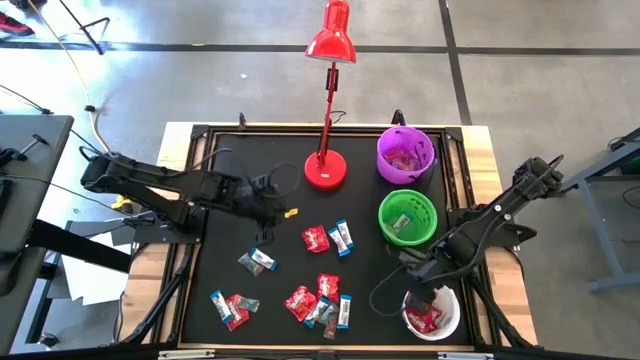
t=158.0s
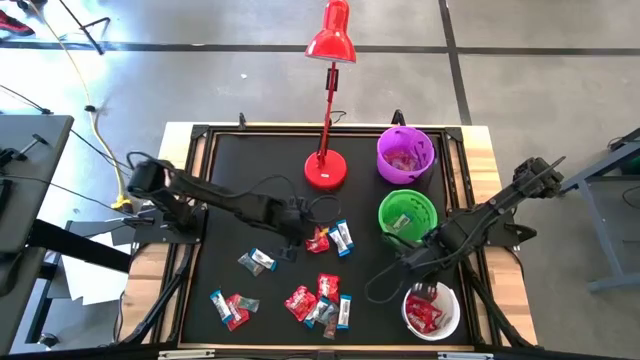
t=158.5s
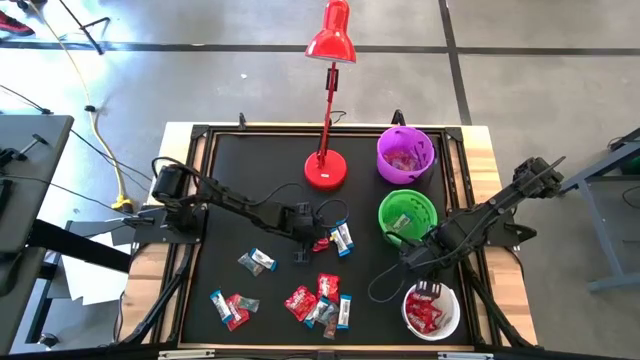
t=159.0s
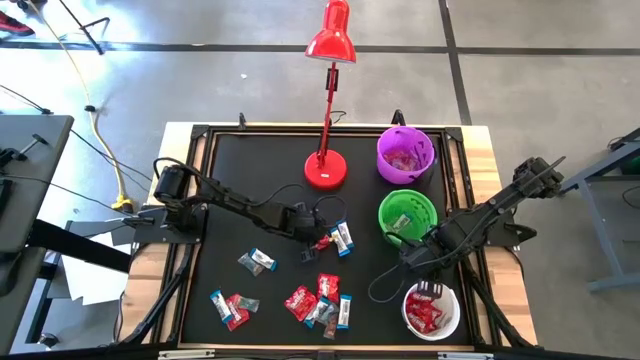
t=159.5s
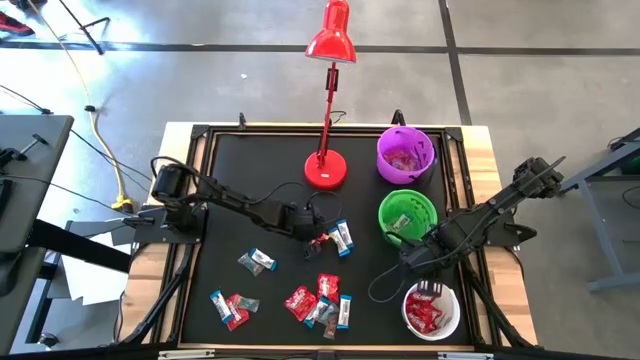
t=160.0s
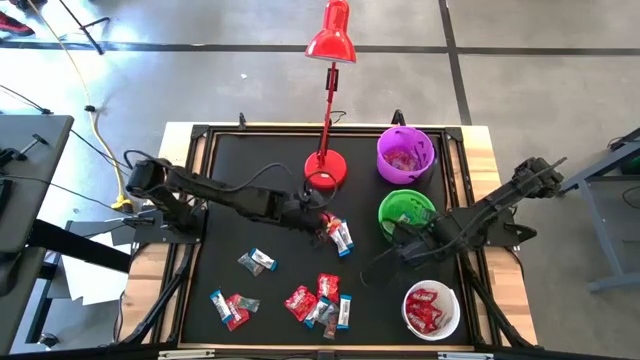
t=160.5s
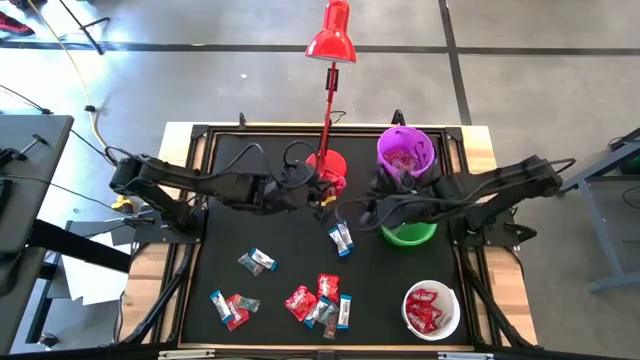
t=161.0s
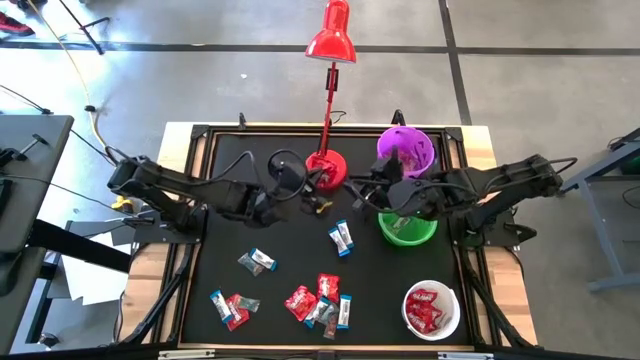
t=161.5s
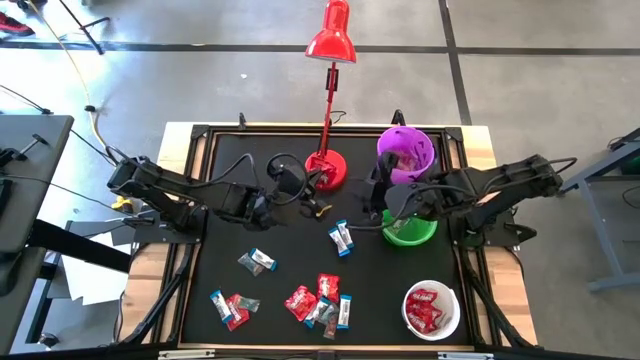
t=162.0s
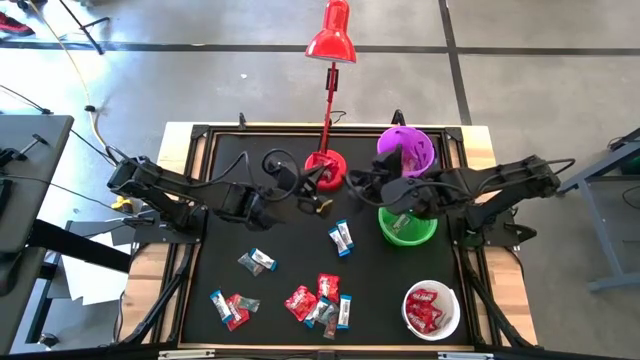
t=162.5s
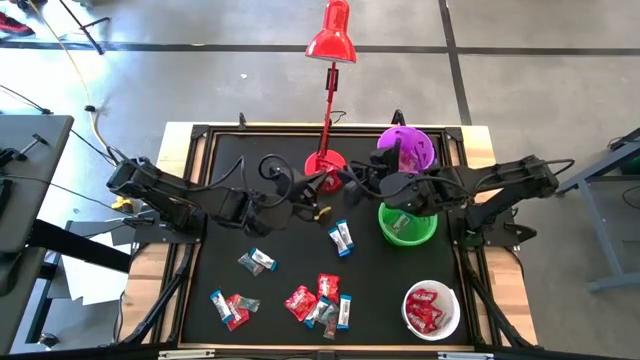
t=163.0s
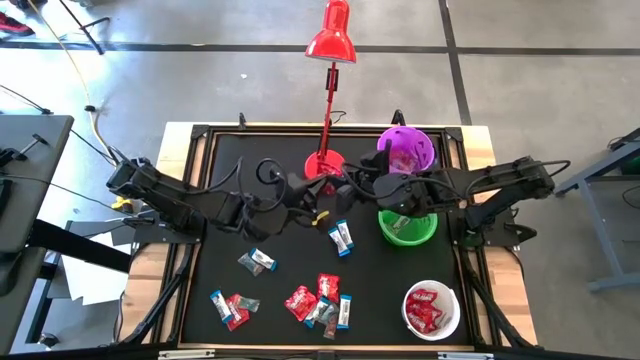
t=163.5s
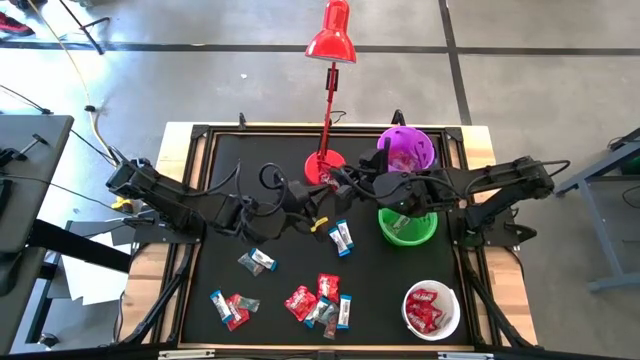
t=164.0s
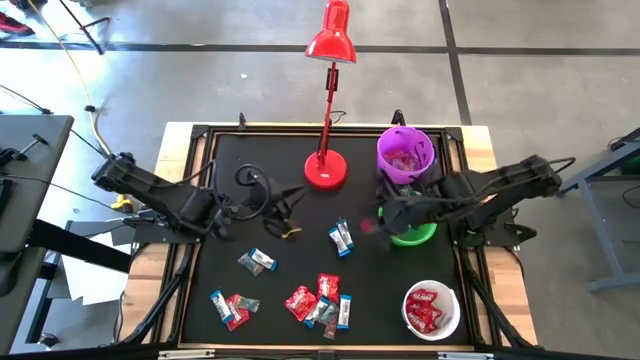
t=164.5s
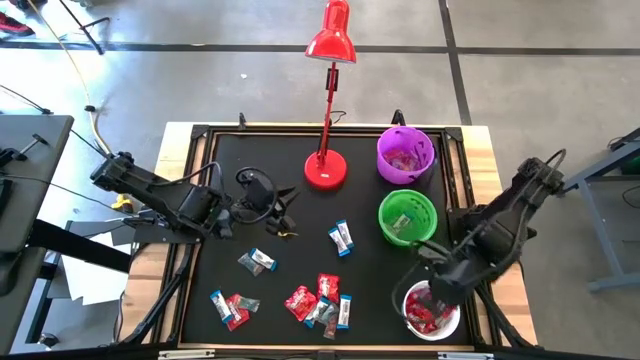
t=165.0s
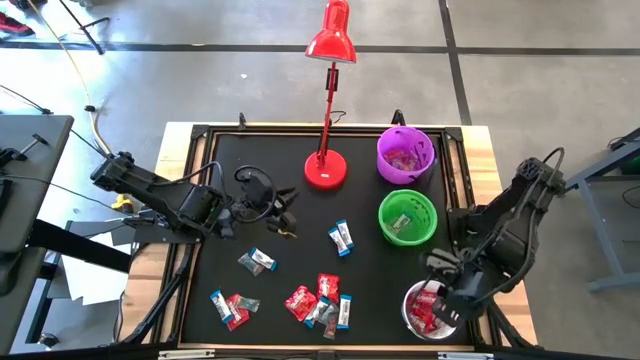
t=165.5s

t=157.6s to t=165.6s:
Task: Organize candy in baskets
Put the red candy into the white bucket

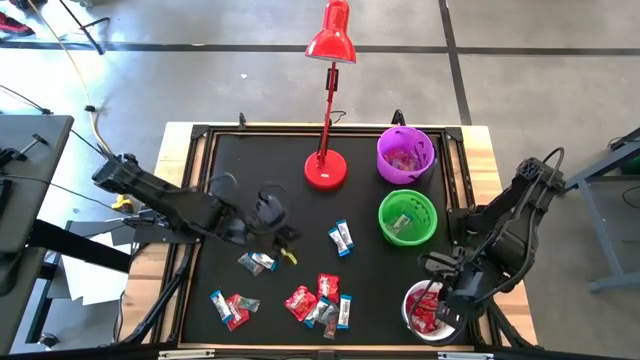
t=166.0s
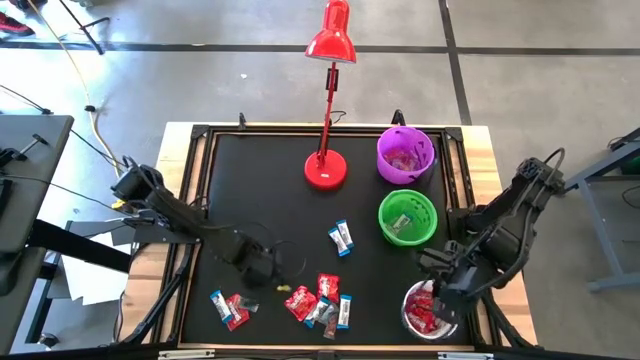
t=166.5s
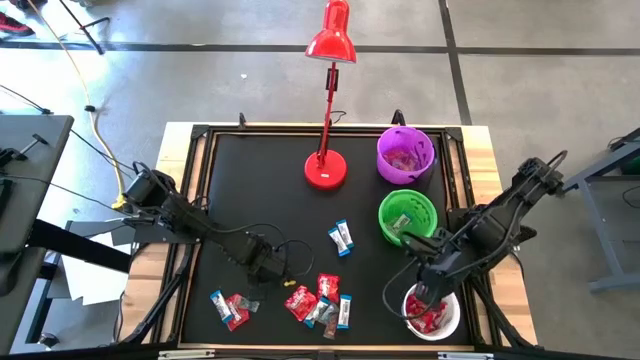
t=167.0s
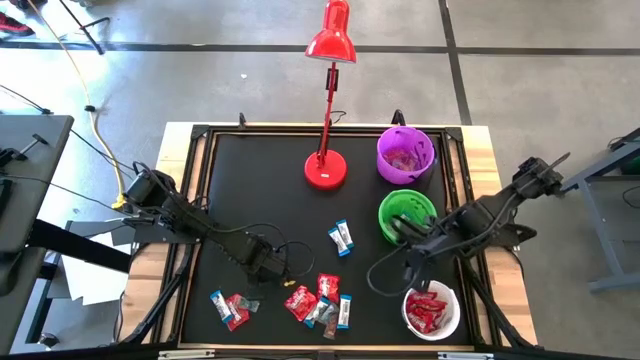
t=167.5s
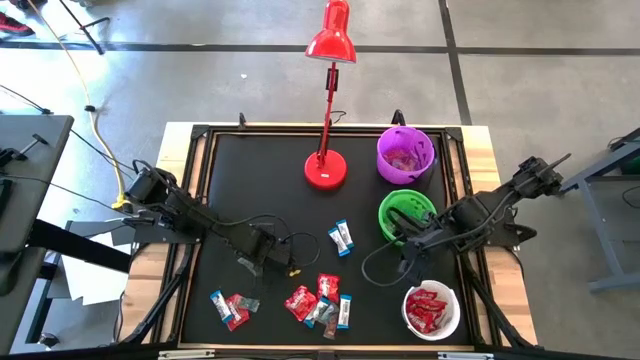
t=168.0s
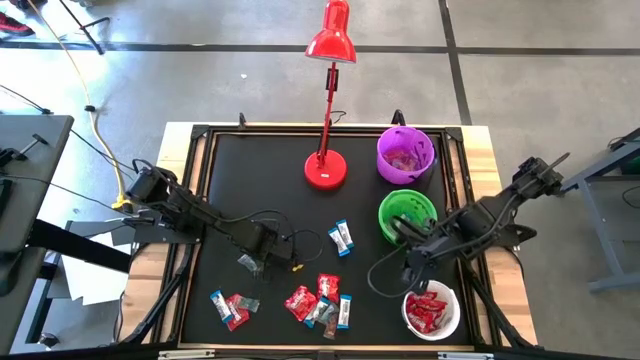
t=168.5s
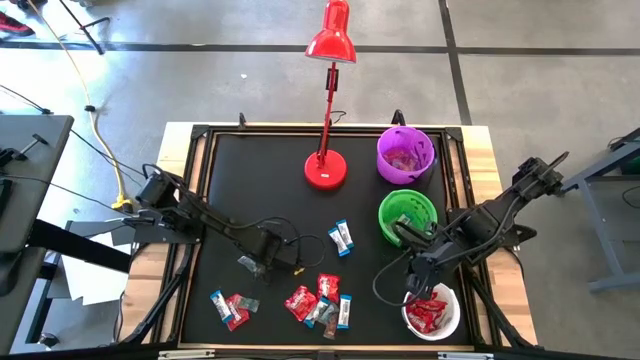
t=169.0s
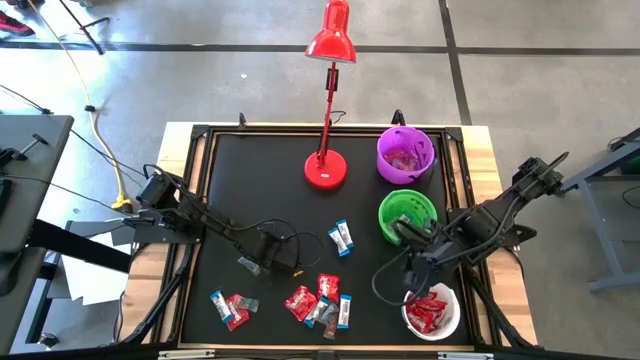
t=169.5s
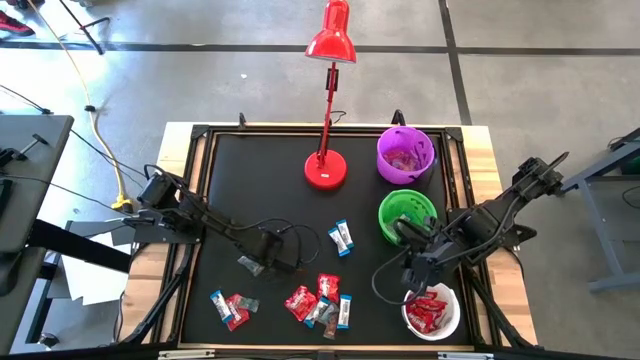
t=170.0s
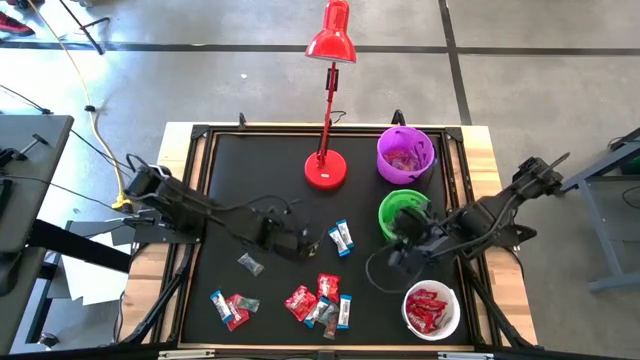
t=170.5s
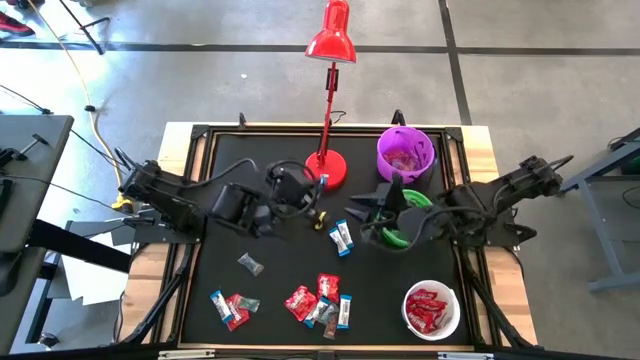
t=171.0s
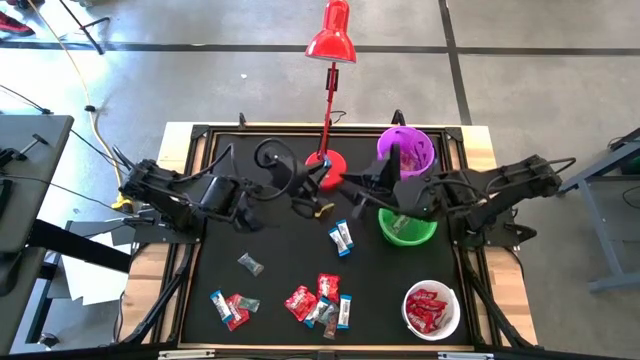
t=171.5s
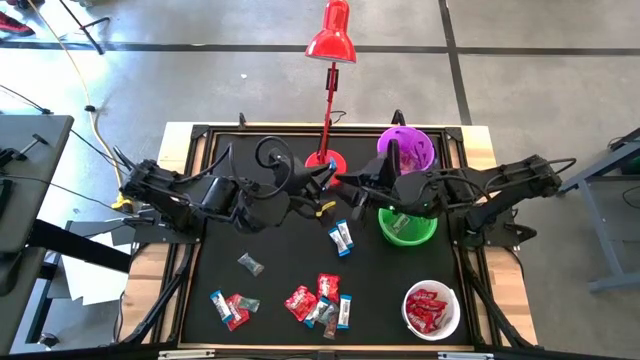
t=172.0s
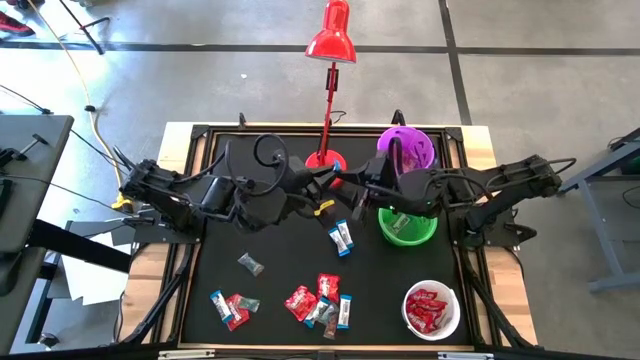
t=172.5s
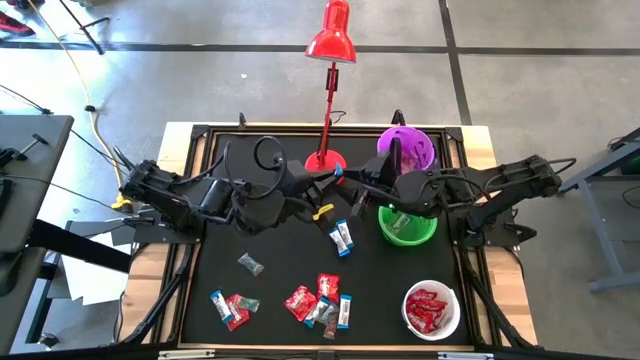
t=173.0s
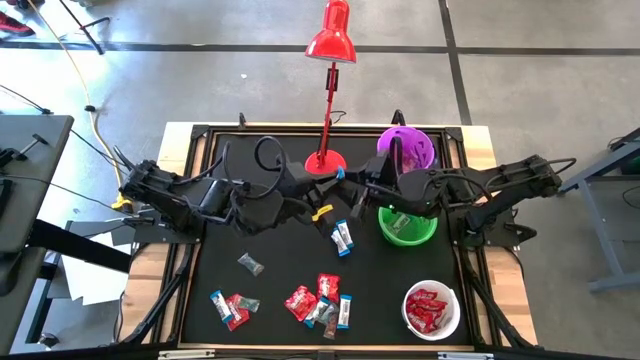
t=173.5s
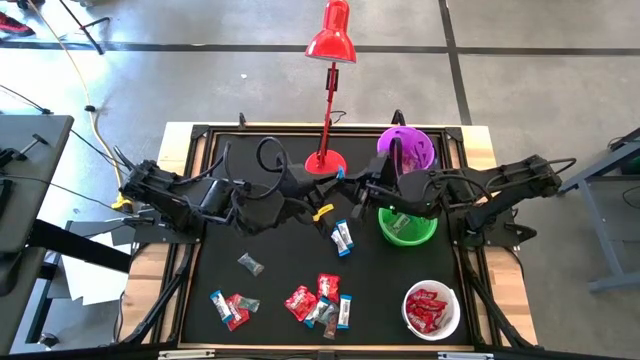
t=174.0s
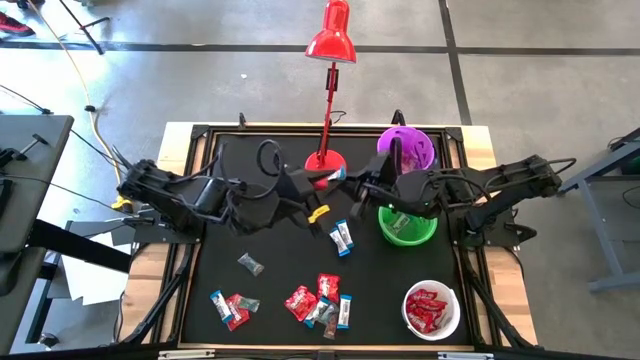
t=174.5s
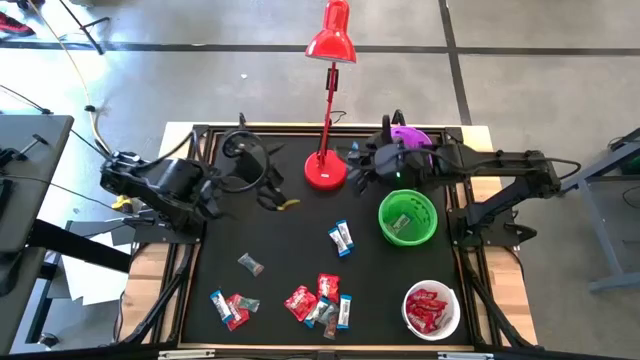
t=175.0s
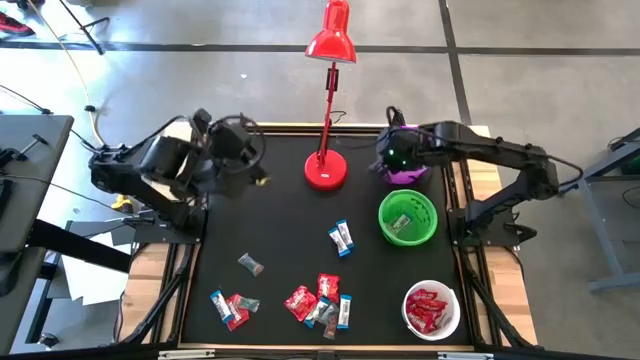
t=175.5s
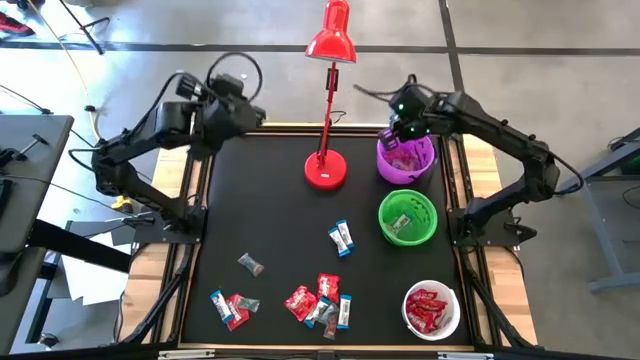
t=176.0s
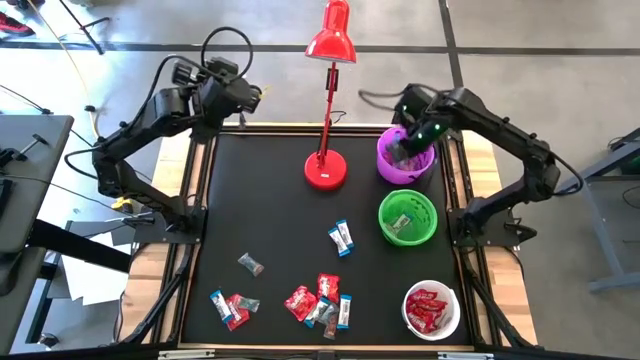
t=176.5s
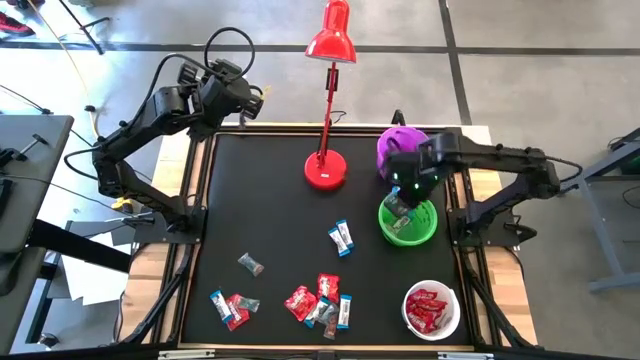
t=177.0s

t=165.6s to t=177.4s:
Put the white chocolate bar into the green bucket

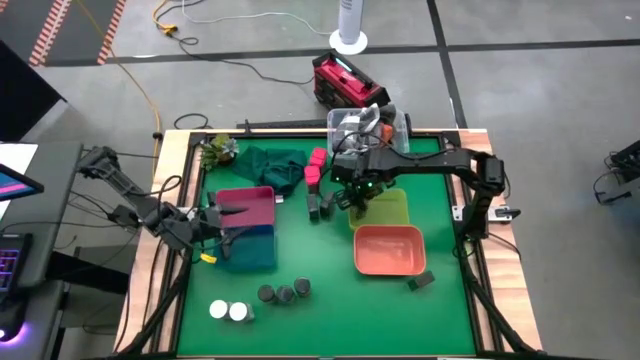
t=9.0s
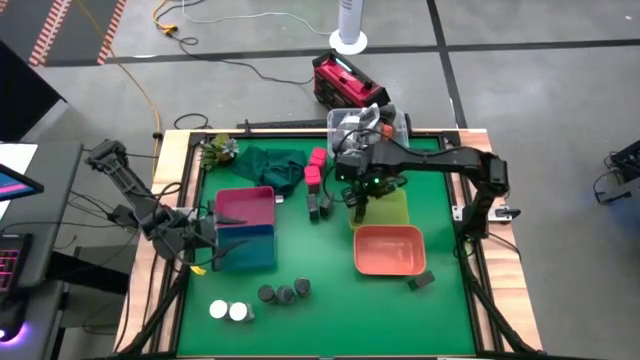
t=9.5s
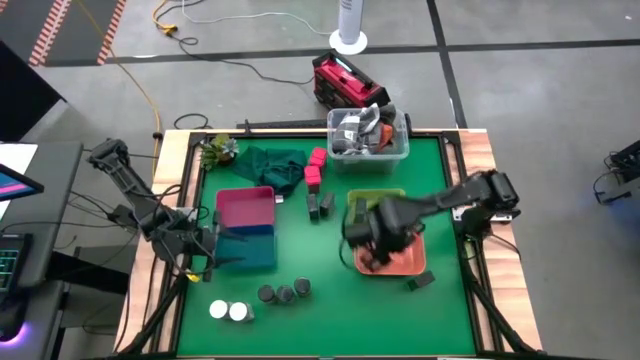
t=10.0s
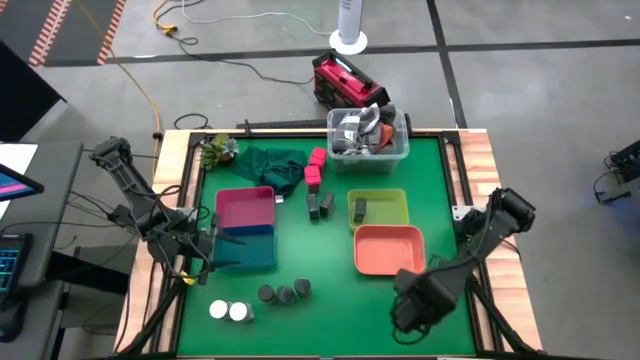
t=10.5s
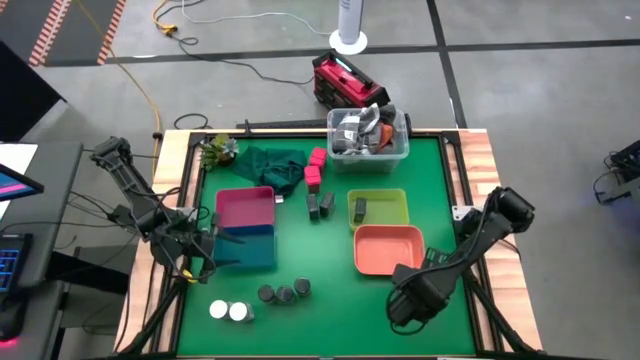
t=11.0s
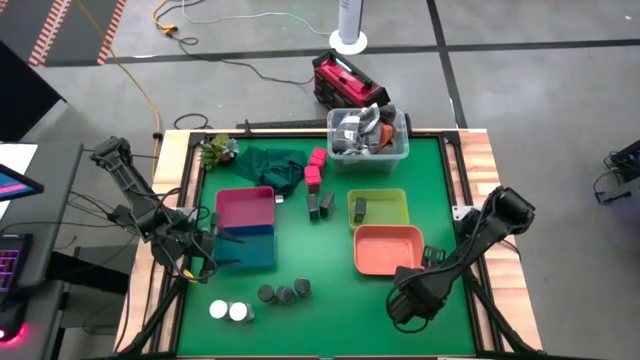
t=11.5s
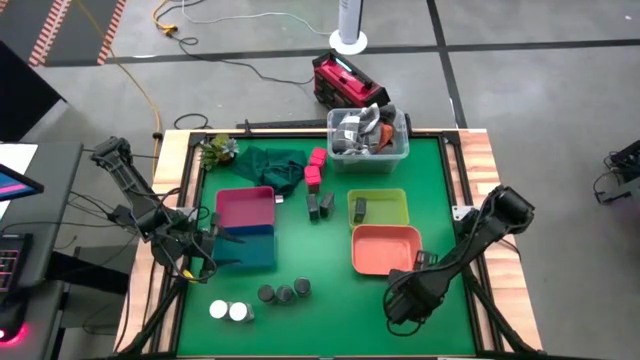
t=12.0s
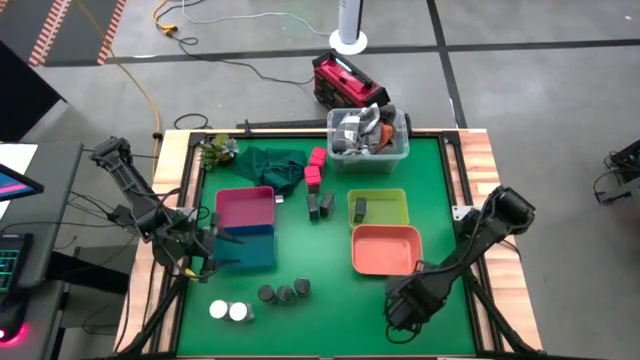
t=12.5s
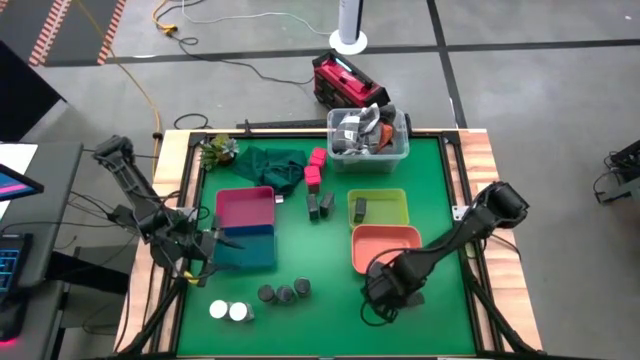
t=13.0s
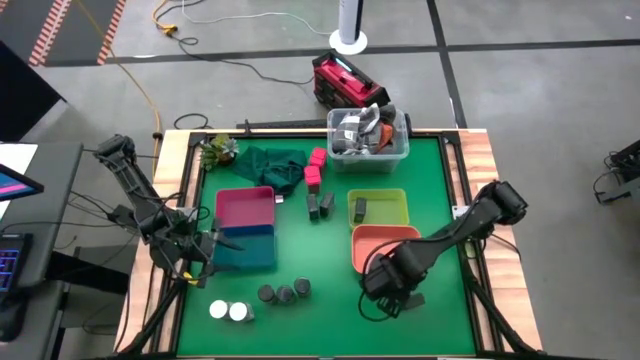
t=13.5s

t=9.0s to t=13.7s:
Task: Sort spices by type
Put the black spice can into the yellow bin
